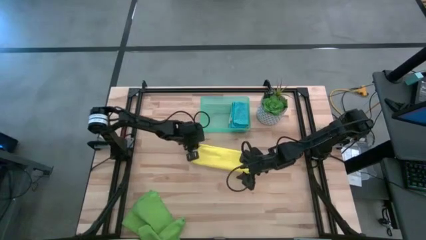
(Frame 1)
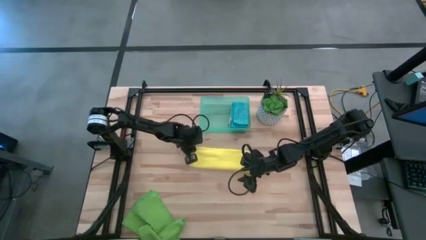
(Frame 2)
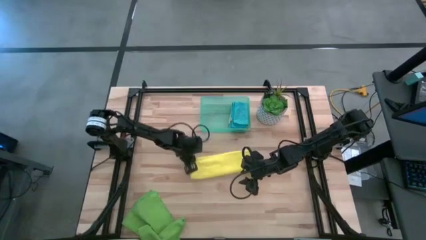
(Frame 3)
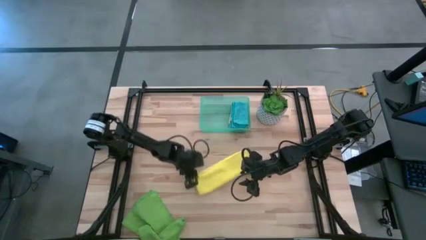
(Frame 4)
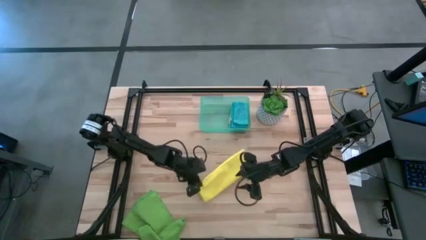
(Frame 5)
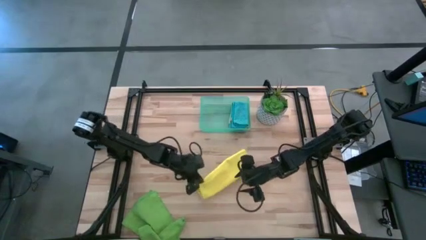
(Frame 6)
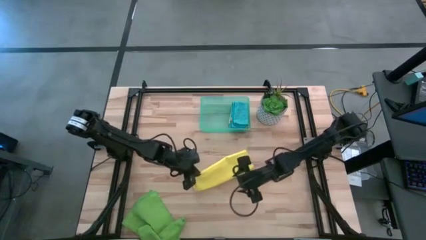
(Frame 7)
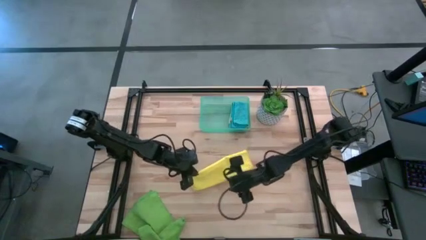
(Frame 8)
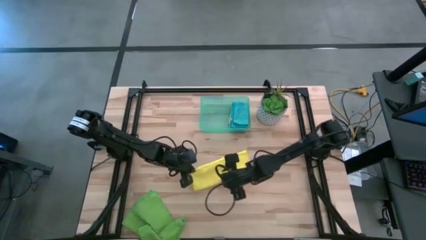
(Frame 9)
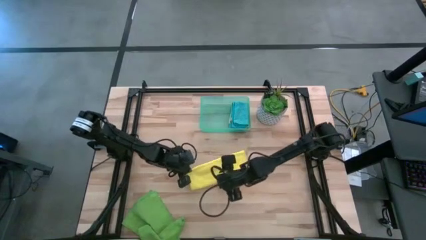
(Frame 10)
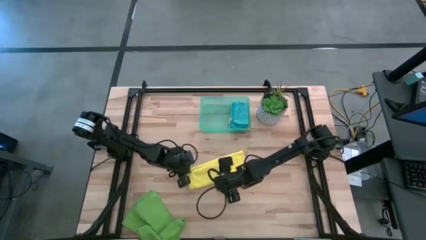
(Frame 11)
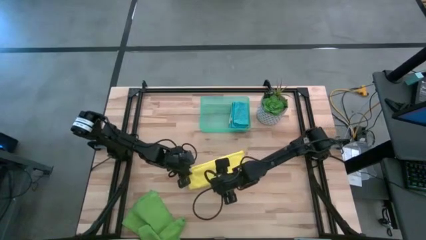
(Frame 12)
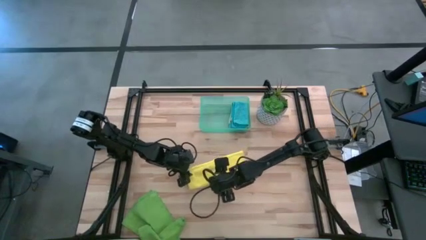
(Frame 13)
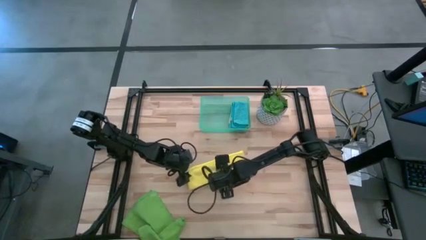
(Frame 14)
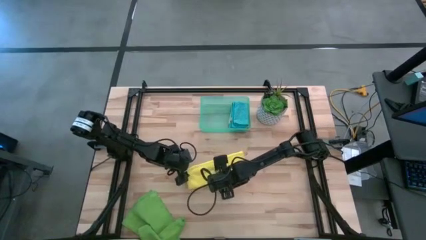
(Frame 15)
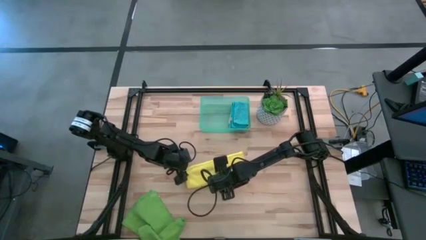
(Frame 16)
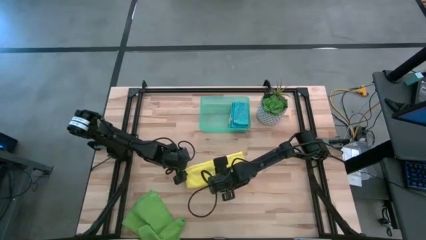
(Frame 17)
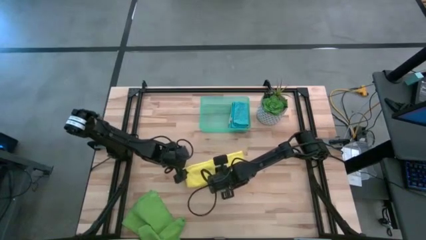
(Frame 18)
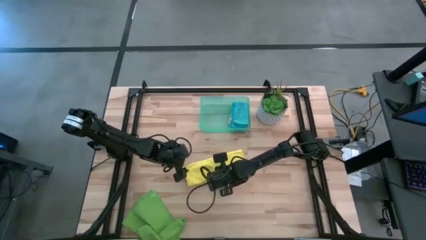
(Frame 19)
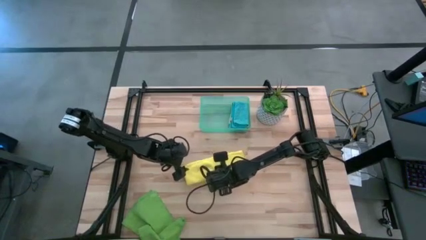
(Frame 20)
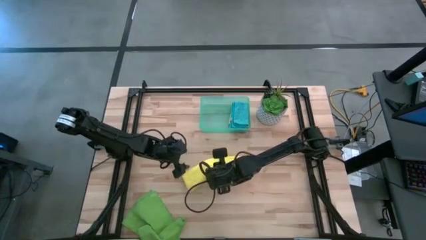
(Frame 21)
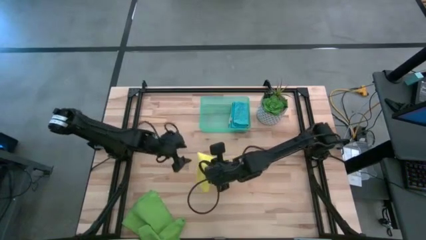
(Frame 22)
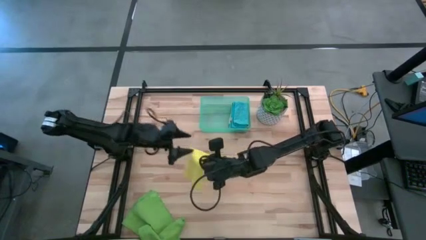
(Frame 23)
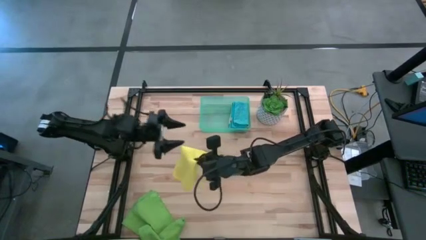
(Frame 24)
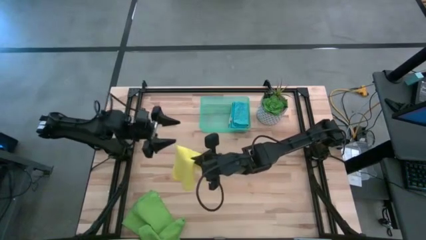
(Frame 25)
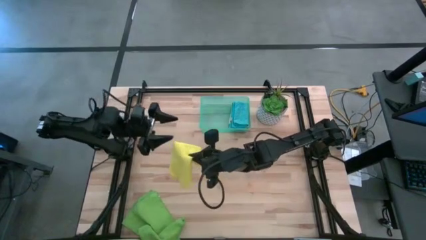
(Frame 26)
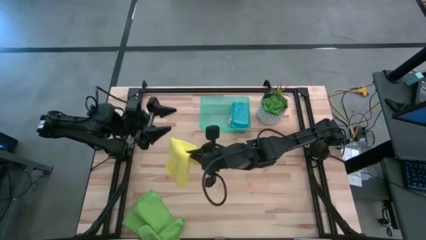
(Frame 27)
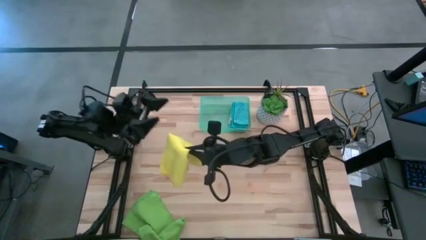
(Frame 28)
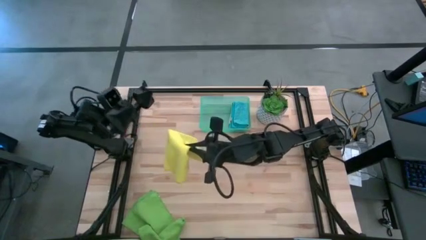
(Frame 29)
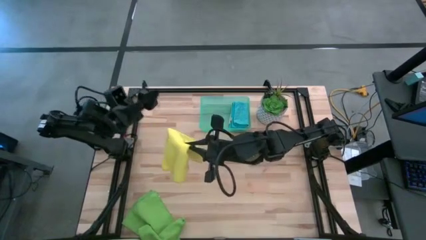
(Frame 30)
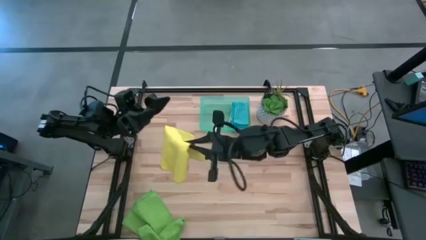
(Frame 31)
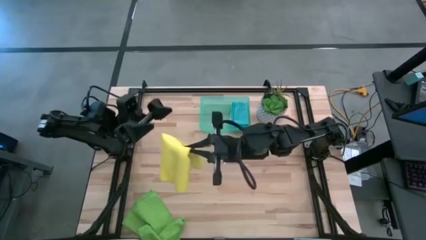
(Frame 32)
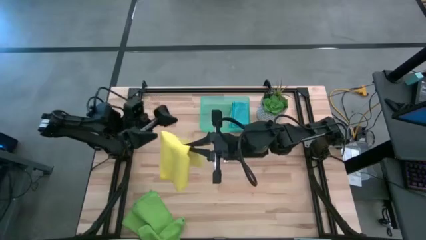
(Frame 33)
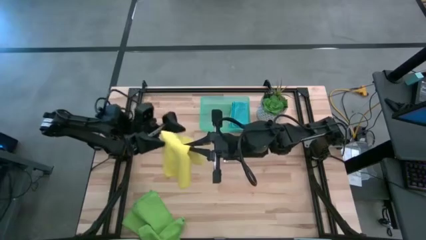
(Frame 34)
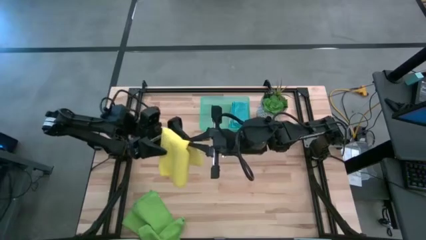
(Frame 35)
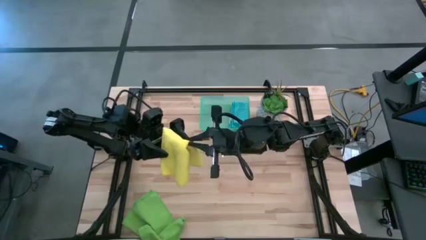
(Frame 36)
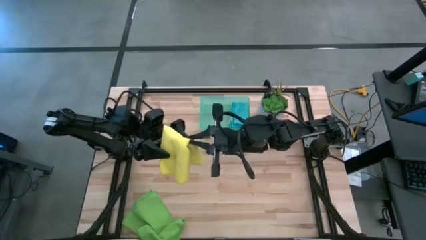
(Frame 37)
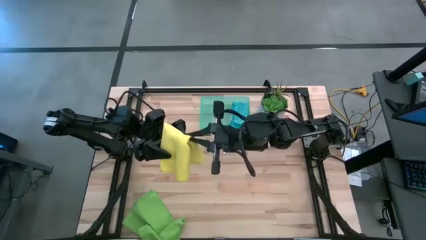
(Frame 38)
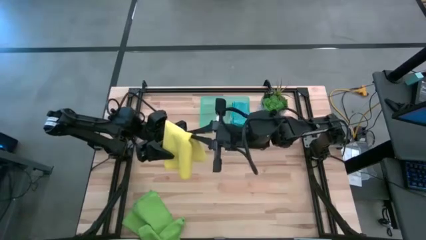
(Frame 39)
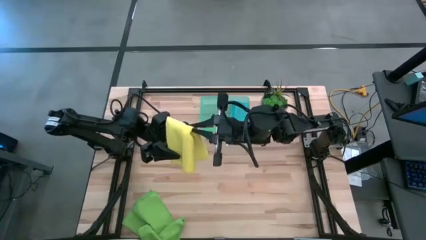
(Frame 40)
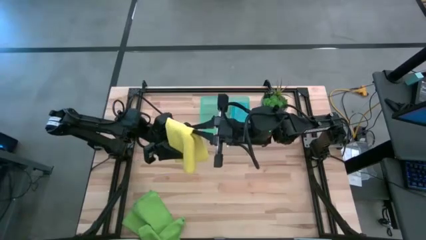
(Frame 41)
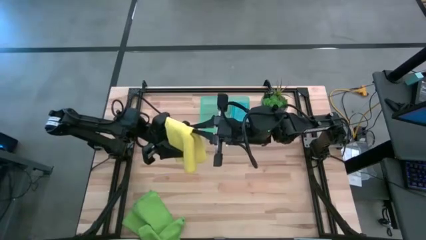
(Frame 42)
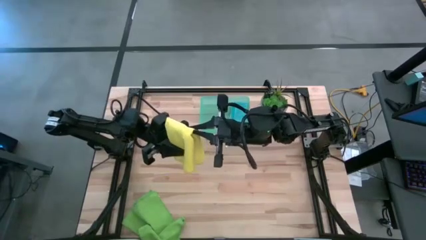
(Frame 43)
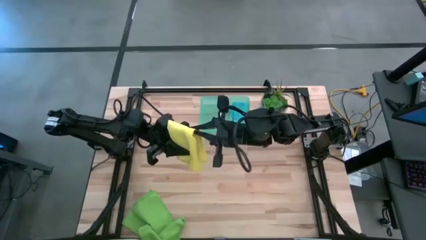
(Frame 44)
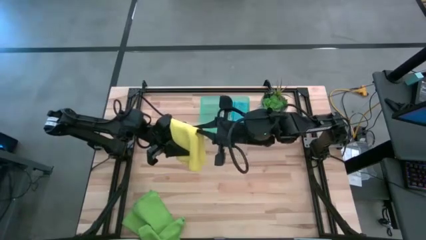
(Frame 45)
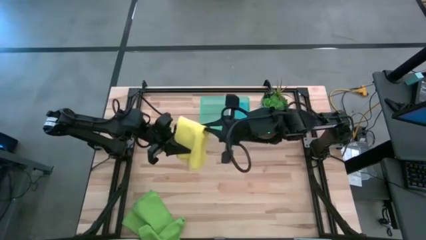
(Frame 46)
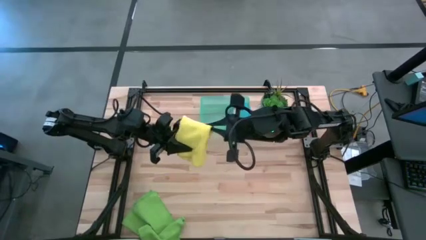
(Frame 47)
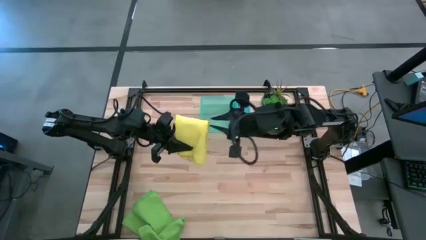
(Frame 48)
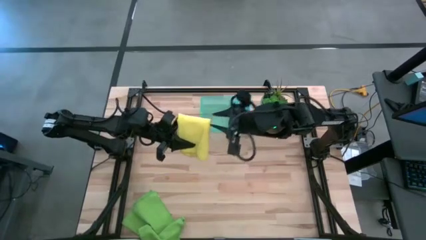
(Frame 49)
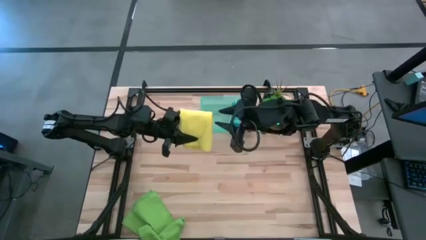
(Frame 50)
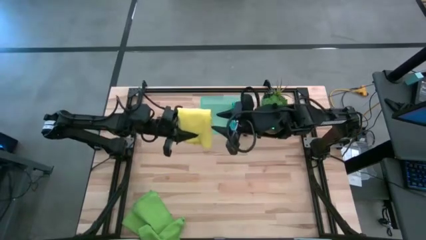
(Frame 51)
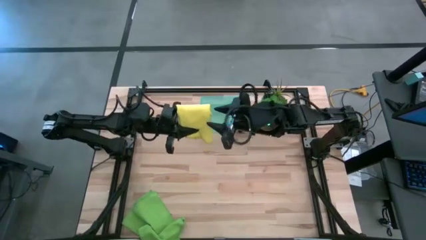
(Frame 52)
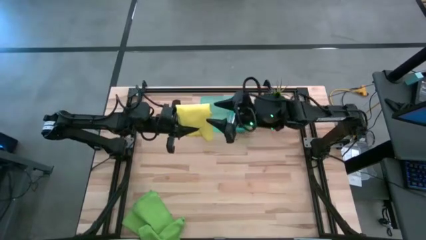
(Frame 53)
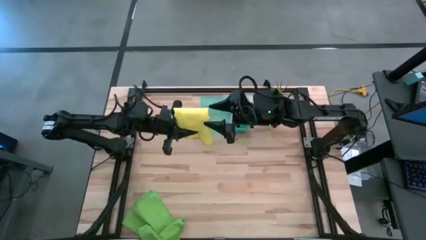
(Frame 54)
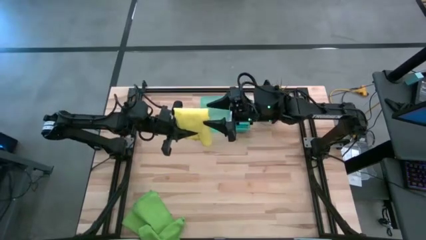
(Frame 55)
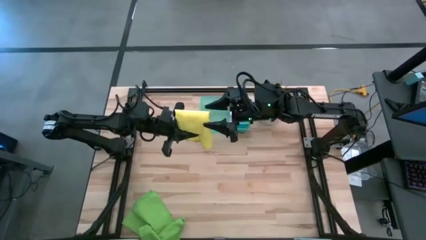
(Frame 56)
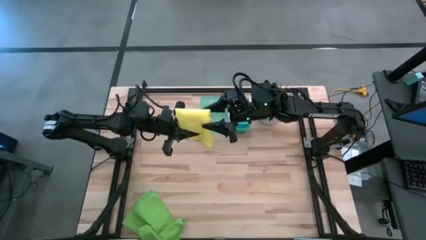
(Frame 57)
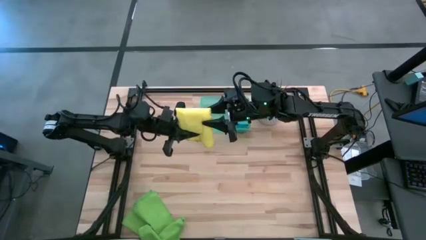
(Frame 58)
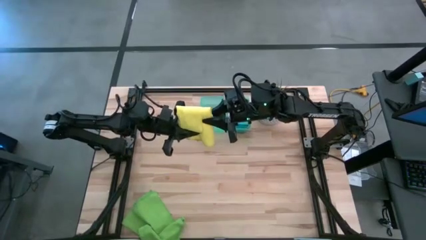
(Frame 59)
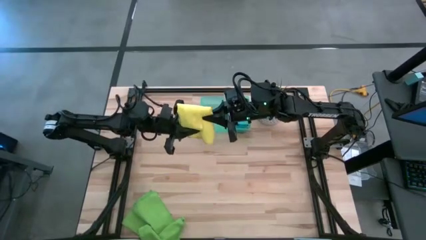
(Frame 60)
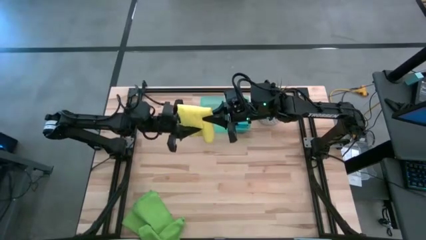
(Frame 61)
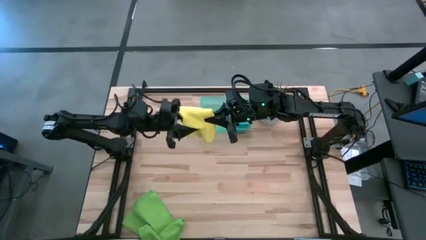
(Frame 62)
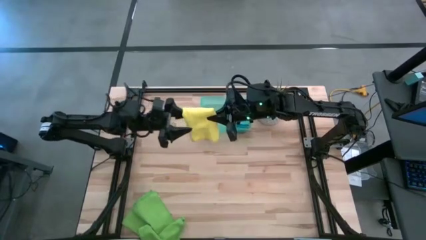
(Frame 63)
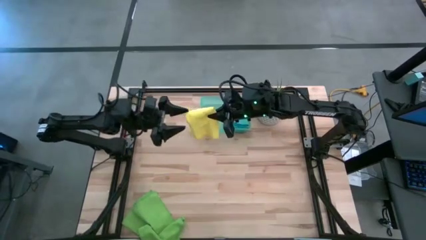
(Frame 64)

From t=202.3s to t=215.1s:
Task: Fold microfiber towels
Fold the yellow microfiber cloth

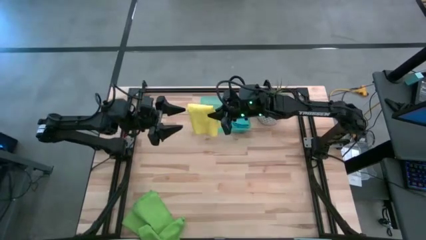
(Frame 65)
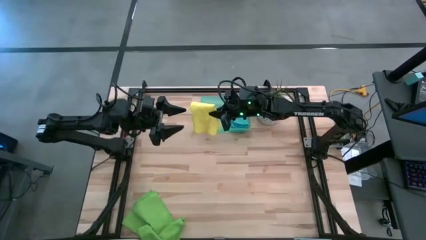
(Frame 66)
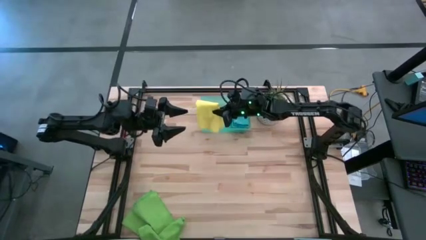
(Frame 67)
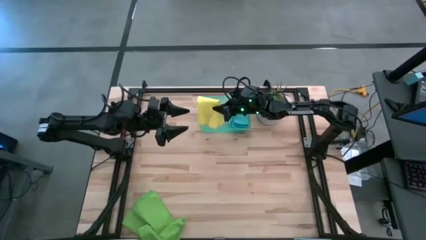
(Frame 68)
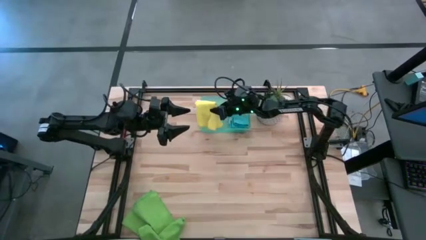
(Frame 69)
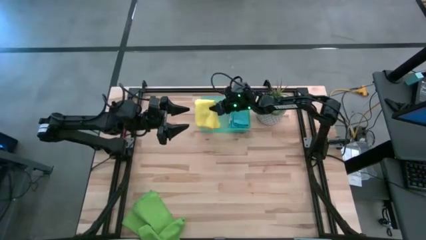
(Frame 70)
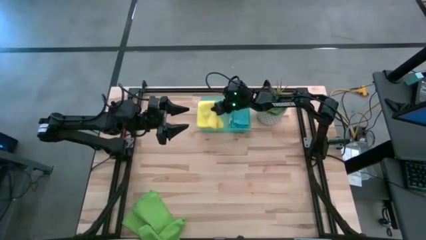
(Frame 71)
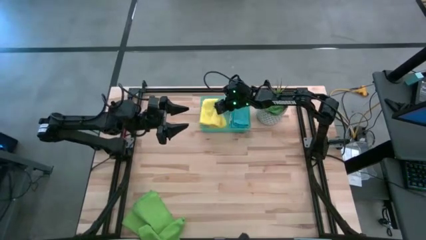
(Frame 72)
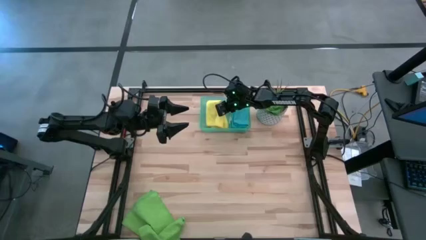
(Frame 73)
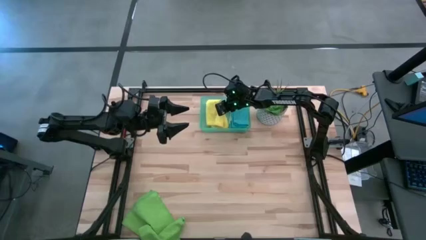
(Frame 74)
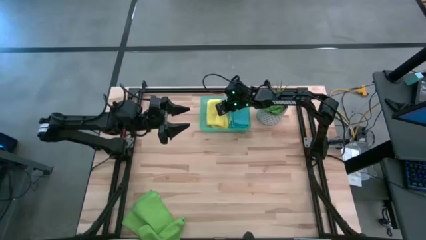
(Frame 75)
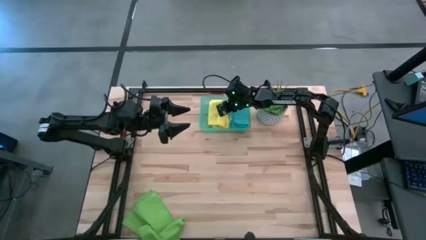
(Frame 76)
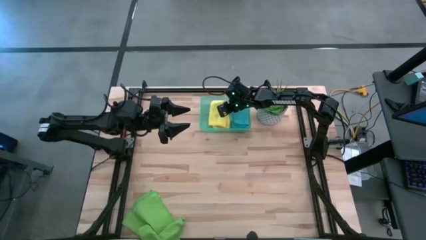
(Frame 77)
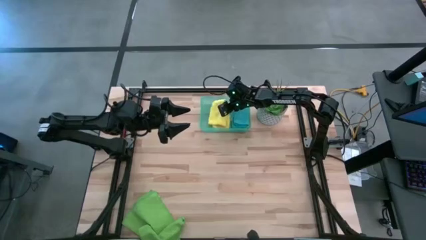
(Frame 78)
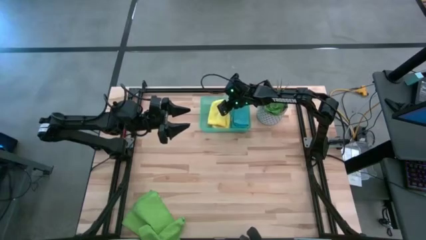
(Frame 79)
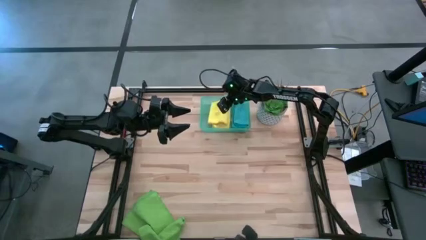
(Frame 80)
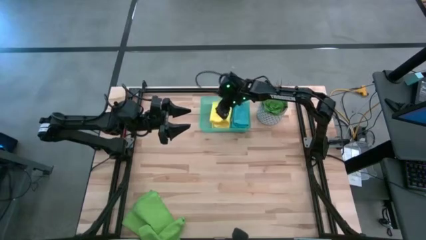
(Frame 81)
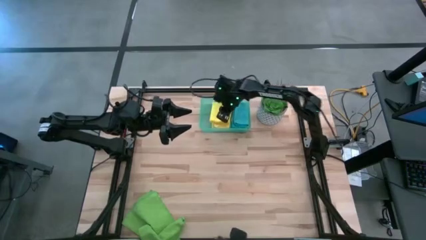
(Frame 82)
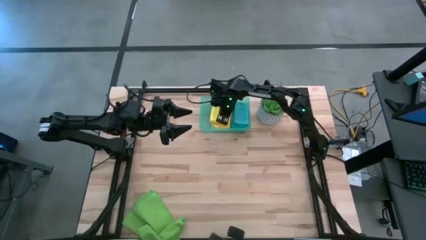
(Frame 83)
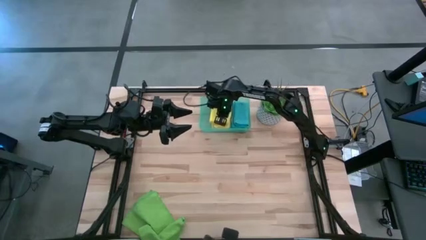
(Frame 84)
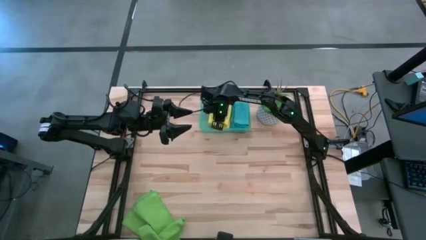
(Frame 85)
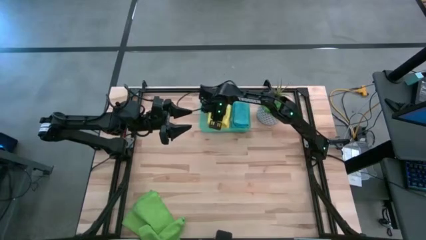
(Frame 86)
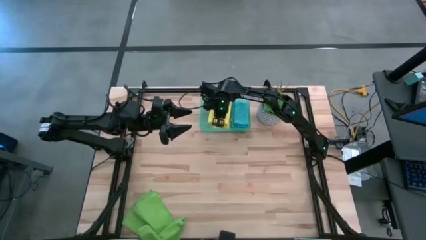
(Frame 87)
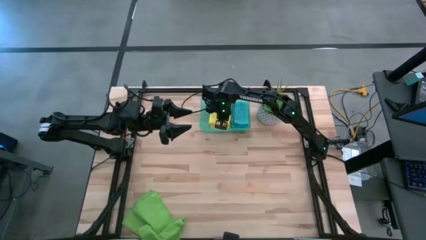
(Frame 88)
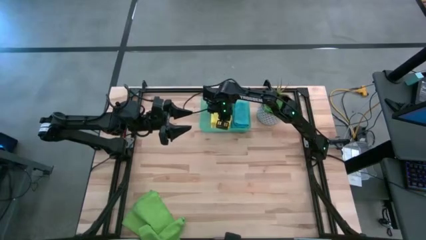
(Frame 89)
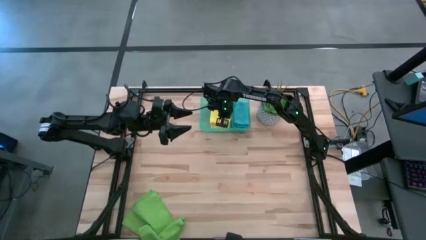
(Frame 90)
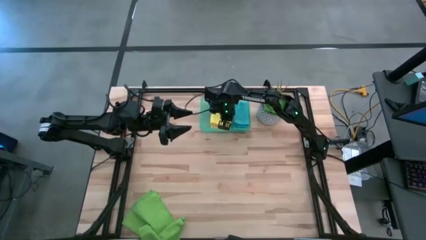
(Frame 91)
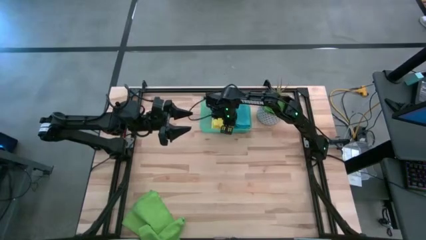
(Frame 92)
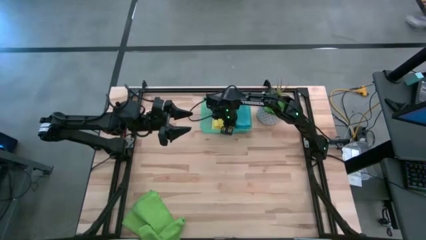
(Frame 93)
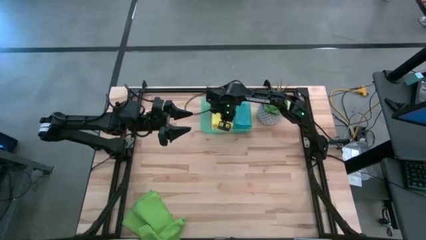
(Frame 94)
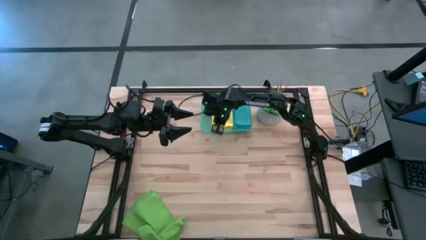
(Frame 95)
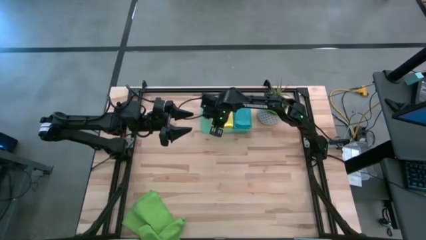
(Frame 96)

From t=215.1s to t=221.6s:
Put the yellow microfiber cloth into the blue bin
